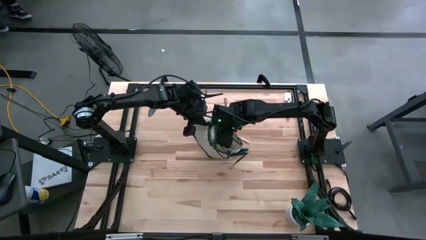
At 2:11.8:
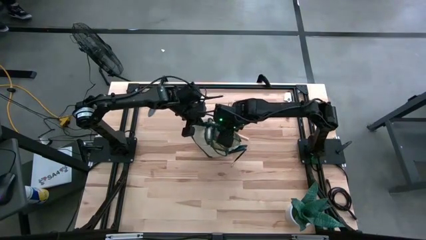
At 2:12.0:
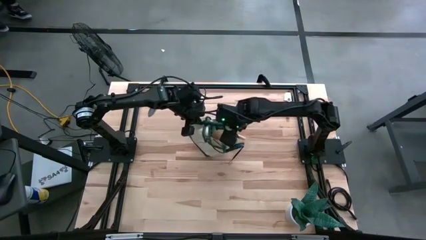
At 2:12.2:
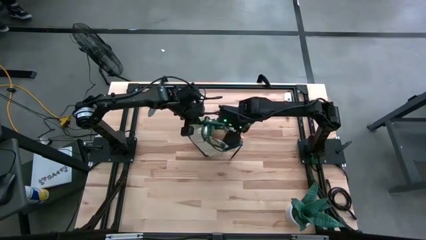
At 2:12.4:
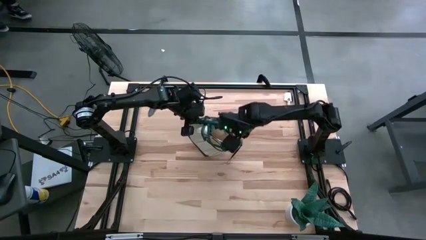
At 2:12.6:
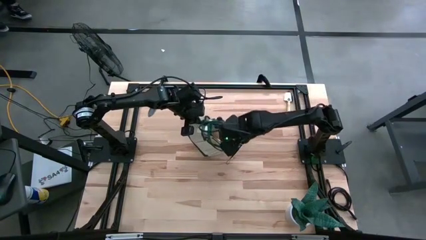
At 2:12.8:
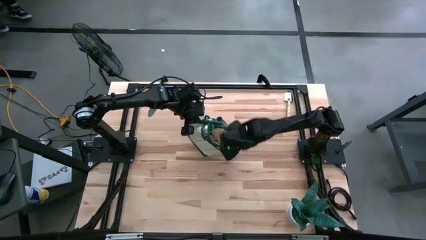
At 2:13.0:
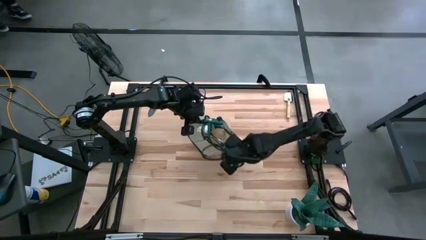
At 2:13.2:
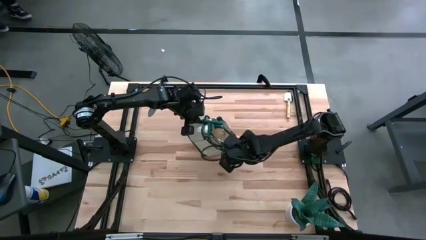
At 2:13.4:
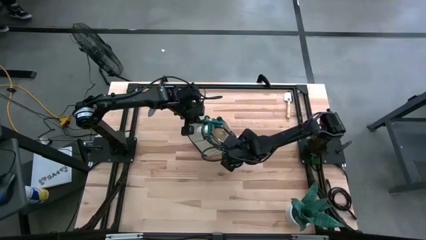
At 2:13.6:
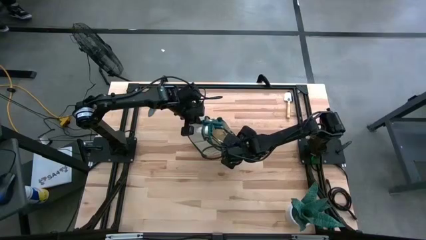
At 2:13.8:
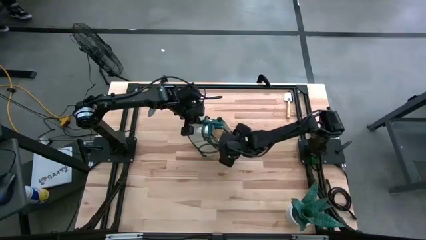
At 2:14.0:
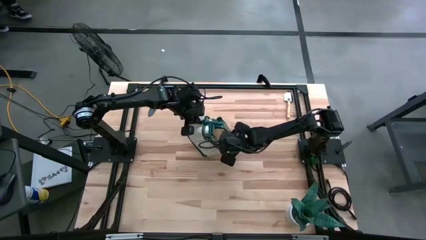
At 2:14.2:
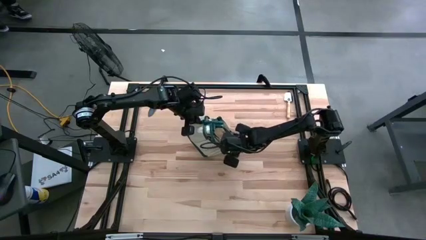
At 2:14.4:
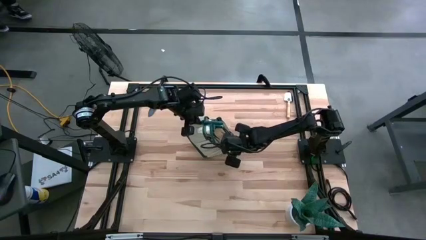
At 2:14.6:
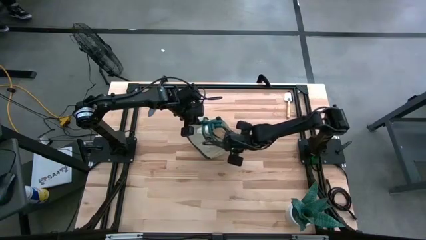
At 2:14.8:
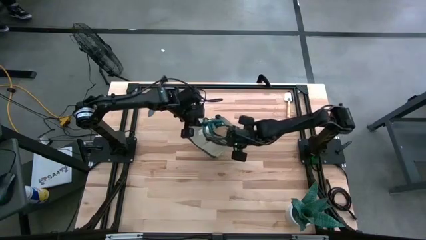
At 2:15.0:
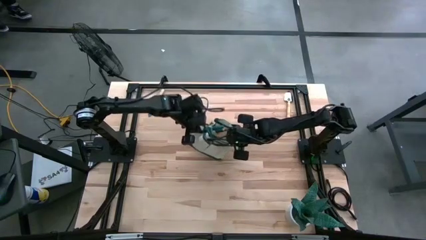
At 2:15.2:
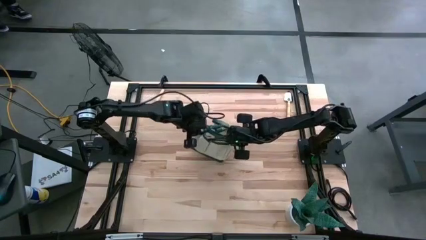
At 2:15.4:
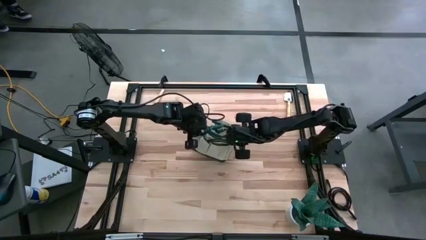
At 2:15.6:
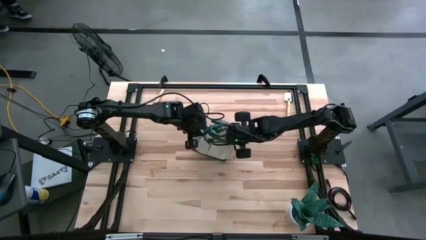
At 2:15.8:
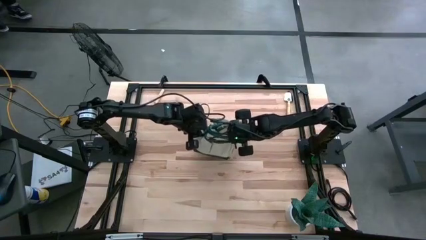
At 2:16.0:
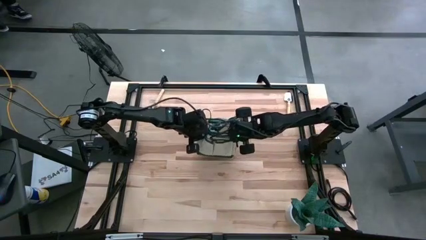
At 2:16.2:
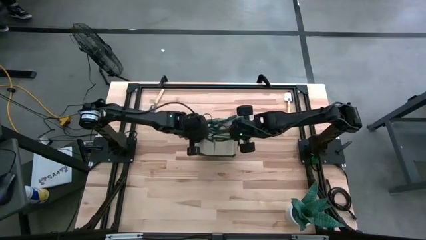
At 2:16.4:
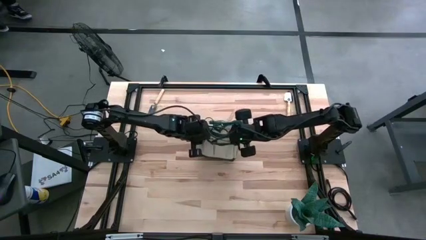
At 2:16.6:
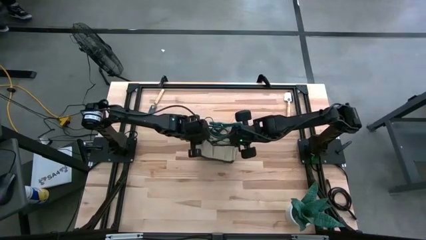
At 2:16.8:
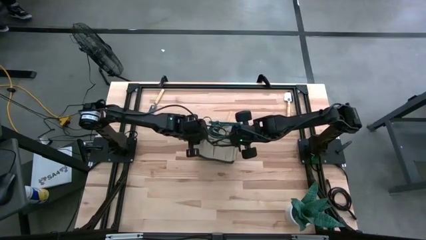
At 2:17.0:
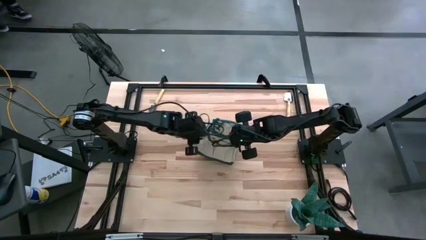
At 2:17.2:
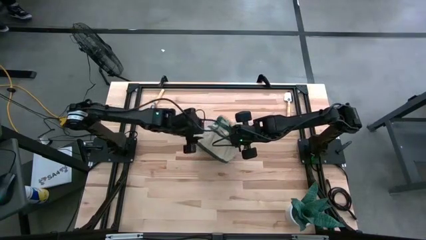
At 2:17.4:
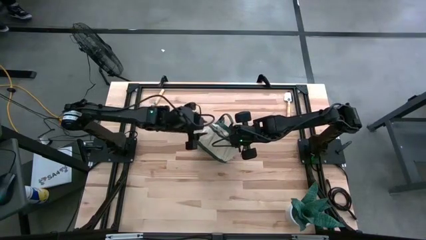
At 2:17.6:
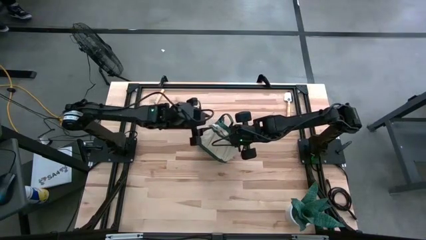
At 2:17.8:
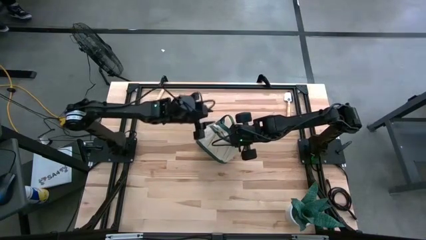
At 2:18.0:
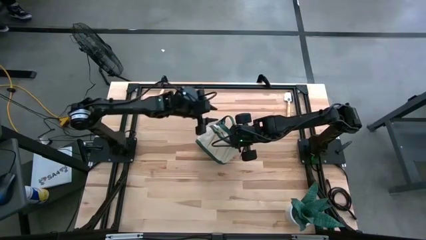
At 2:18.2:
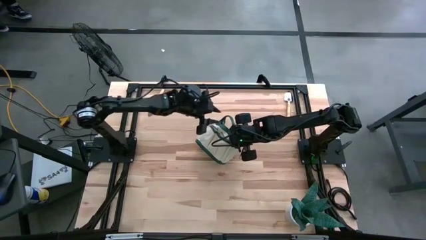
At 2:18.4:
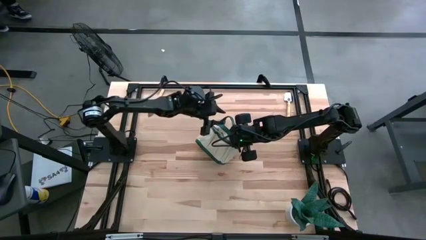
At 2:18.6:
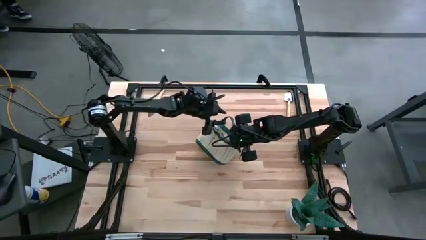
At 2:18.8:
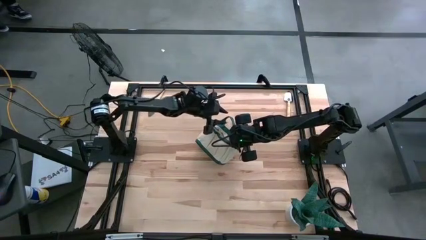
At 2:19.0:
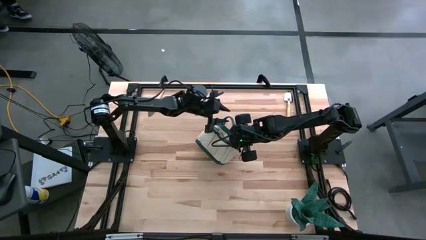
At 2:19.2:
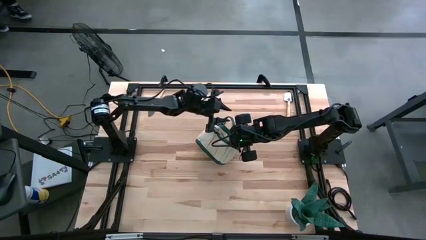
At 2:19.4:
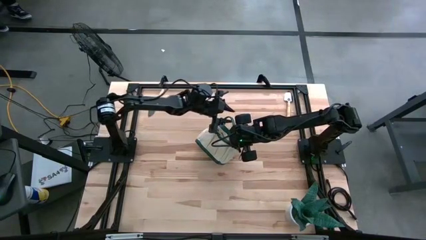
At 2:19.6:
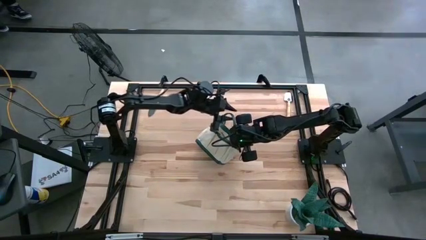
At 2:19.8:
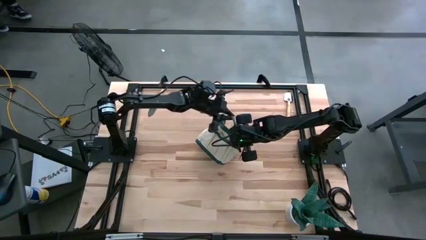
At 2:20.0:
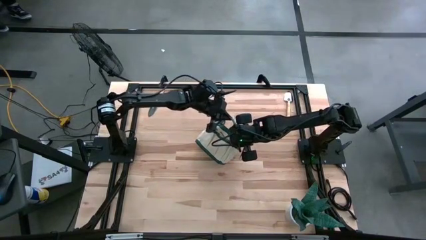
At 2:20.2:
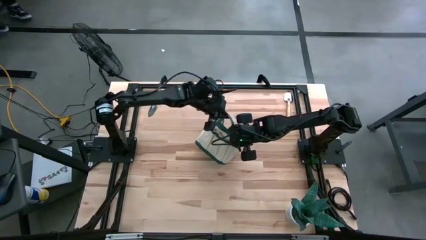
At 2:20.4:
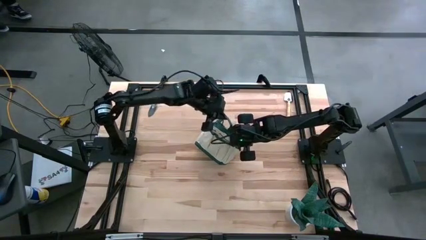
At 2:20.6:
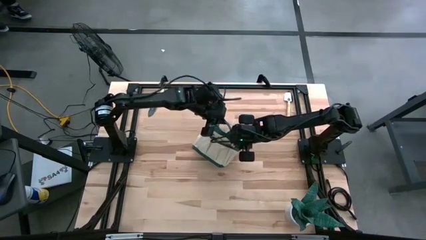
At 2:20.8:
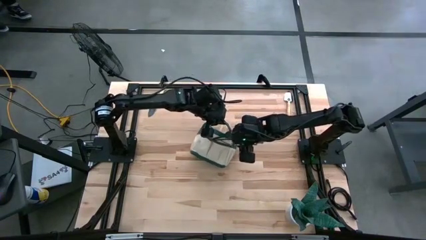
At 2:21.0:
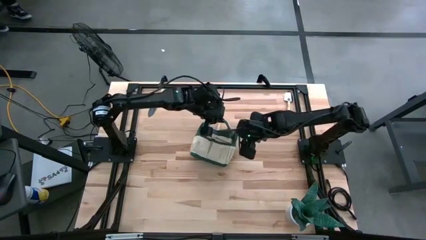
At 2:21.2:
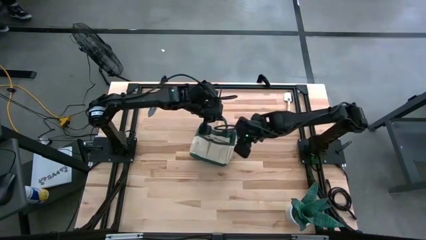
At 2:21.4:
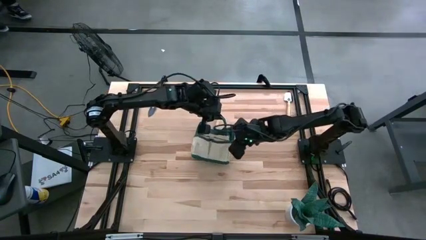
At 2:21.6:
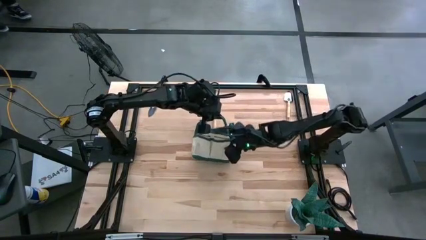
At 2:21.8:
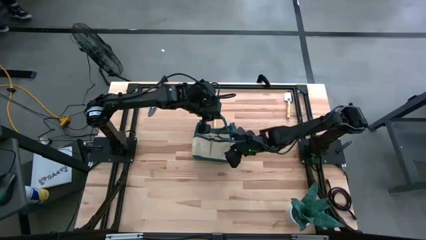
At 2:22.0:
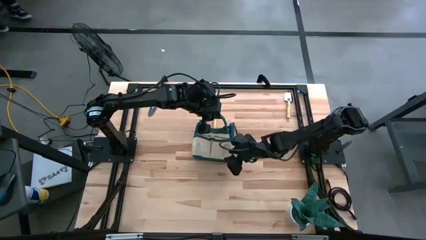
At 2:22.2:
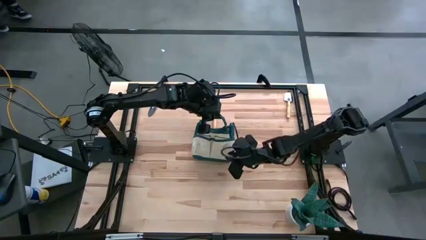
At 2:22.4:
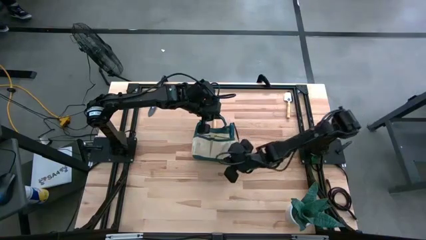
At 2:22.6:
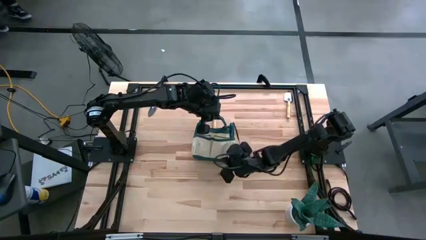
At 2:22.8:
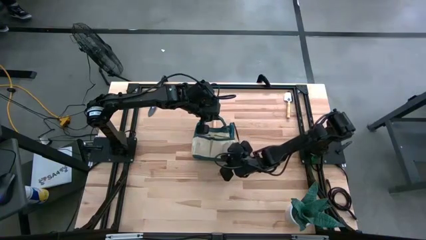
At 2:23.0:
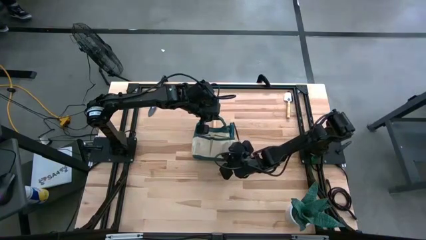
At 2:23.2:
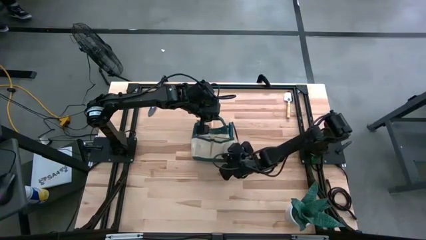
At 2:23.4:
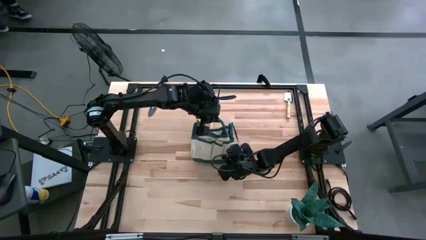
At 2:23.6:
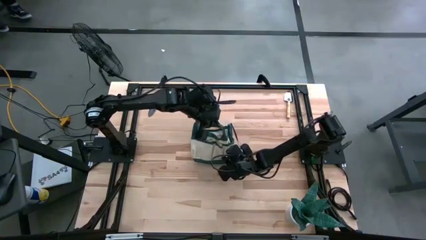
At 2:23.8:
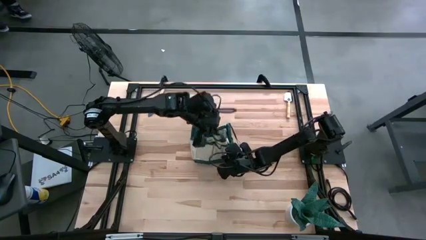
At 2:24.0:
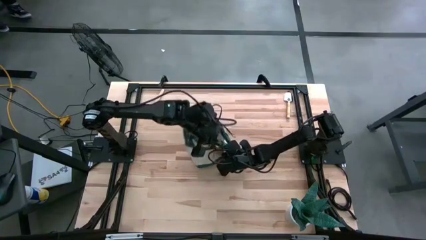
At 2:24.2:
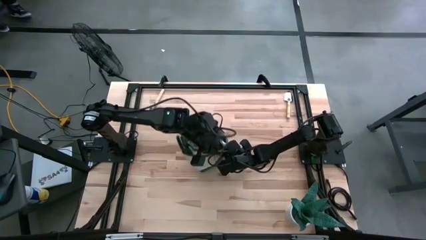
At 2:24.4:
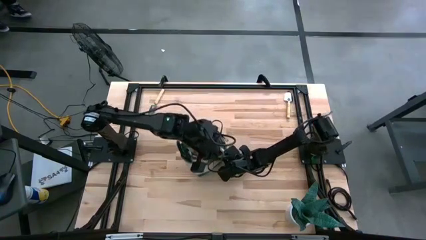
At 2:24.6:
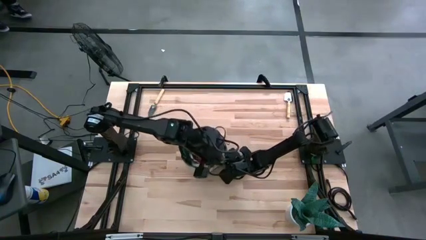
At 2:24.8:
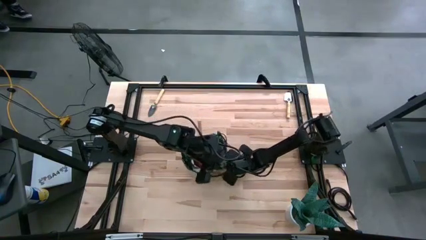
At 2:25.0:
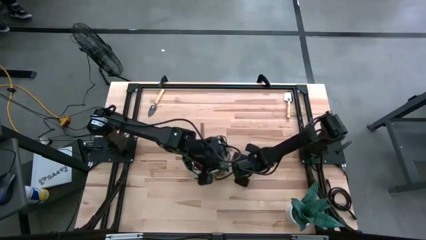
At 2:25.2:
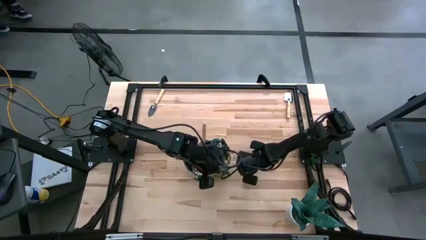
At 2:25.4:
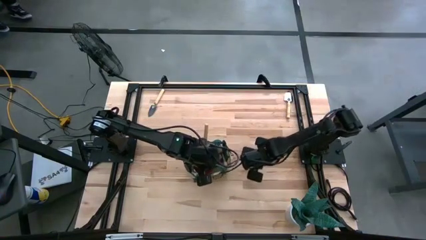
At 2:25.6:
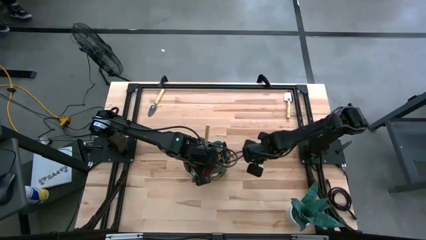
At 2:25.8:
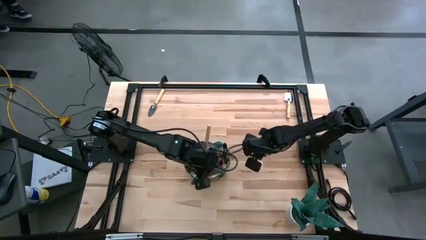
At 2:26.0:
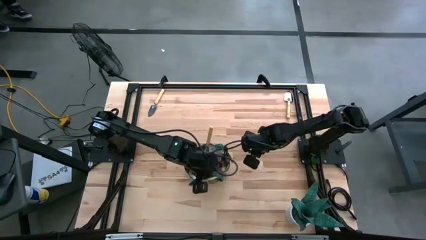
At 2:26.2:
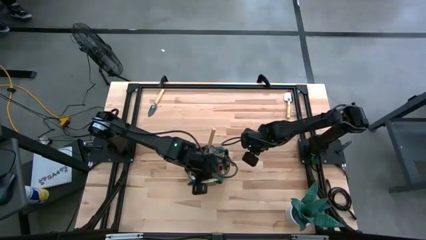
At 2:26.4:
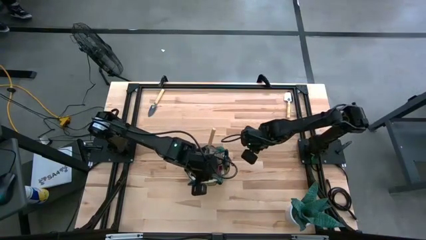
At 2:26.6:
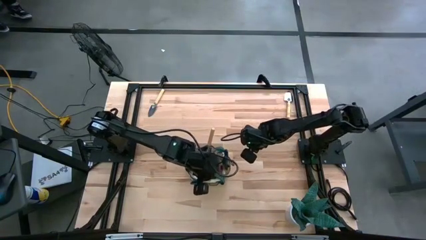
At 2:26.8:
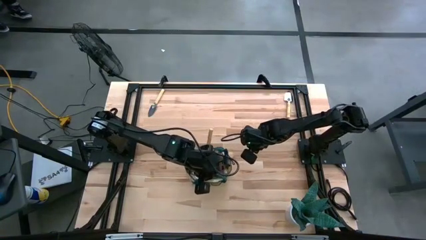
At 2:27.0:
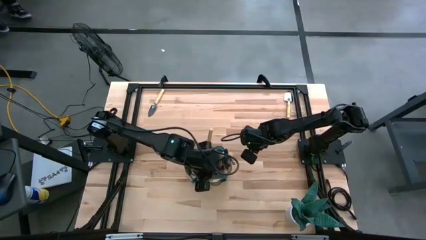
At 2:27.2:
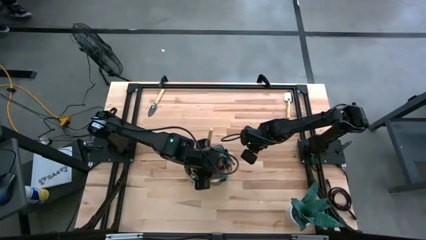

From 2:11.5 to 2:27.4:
Task: Pick & Place Garden tools in Gardening bag
Adjust the white gardening bag
